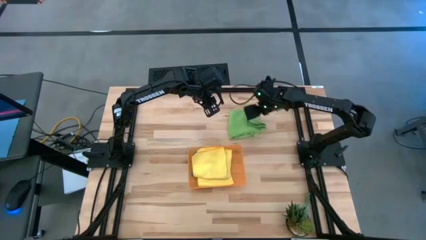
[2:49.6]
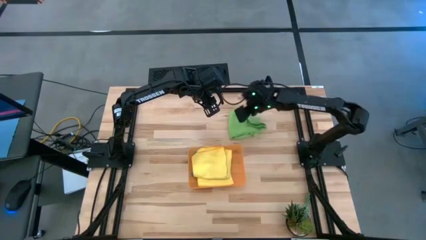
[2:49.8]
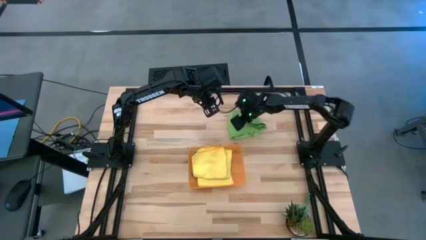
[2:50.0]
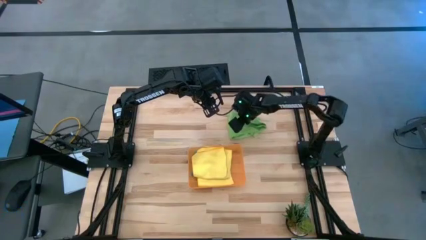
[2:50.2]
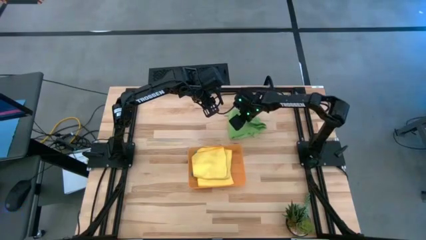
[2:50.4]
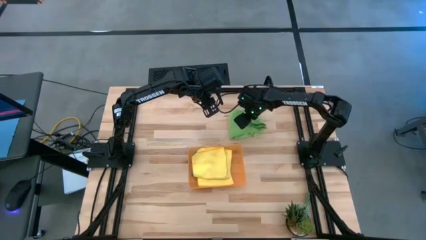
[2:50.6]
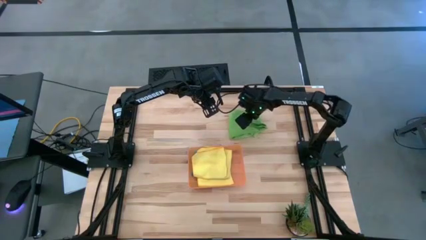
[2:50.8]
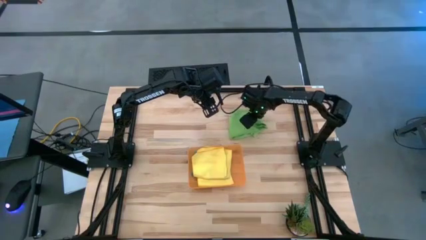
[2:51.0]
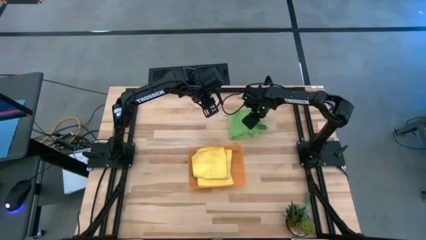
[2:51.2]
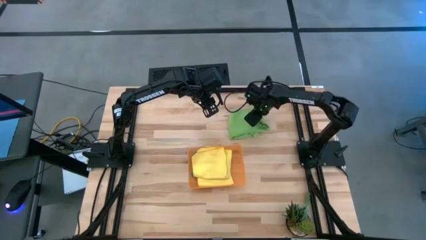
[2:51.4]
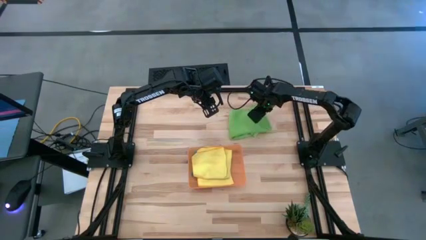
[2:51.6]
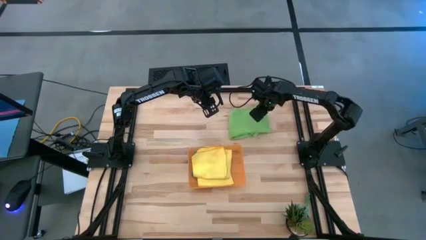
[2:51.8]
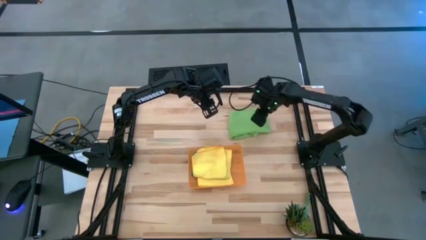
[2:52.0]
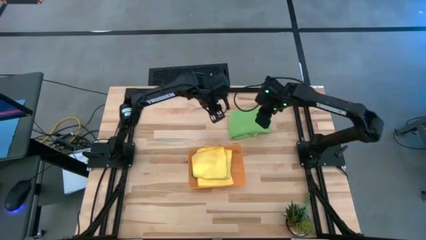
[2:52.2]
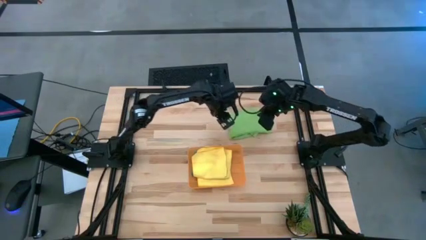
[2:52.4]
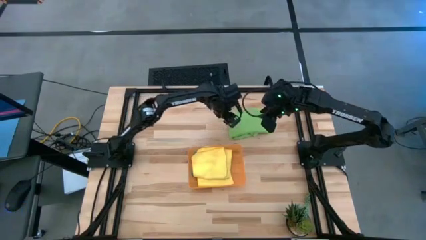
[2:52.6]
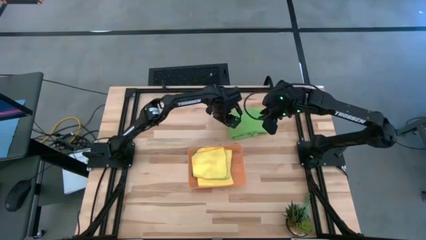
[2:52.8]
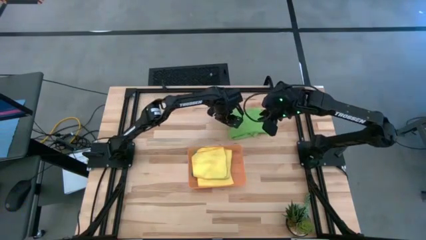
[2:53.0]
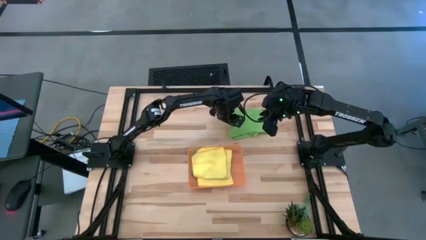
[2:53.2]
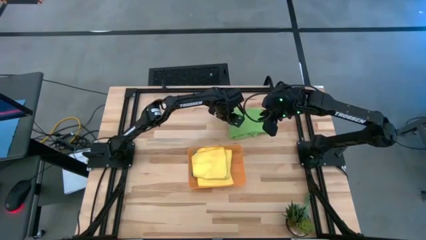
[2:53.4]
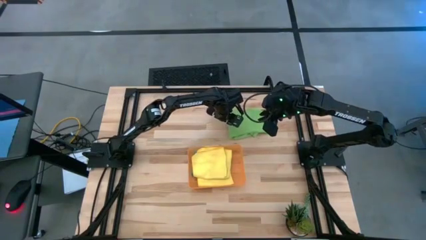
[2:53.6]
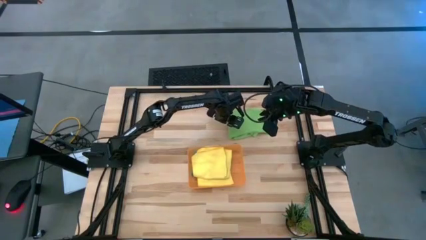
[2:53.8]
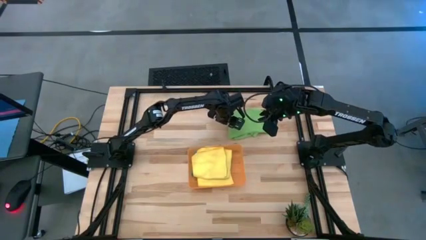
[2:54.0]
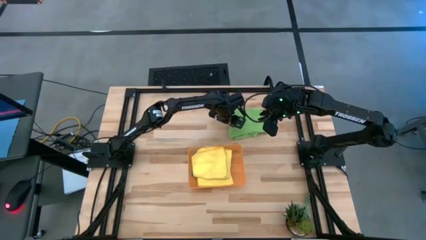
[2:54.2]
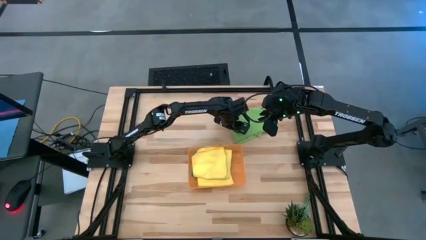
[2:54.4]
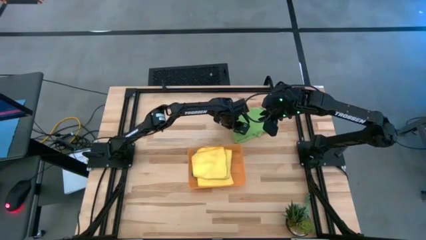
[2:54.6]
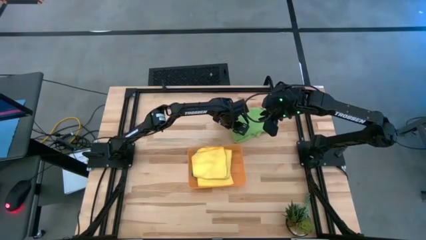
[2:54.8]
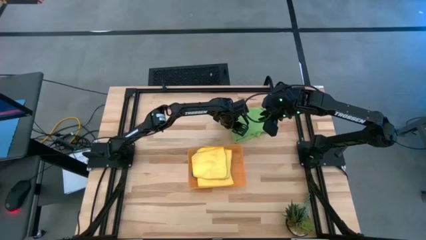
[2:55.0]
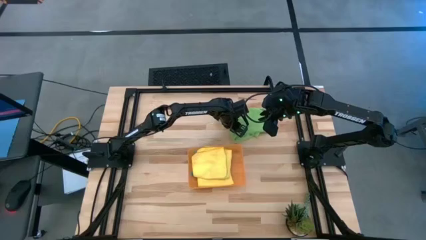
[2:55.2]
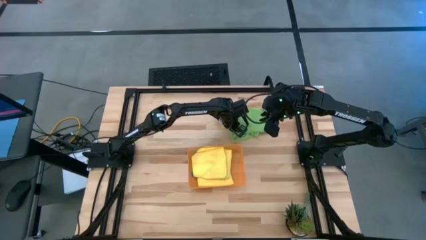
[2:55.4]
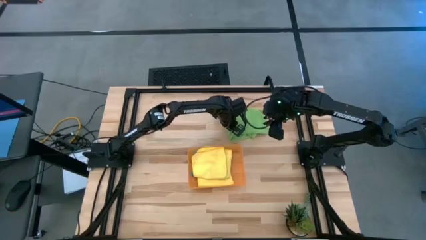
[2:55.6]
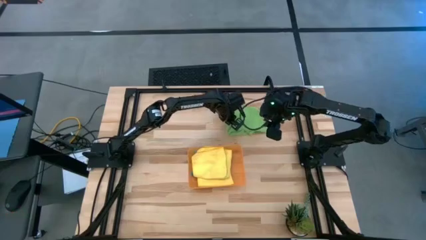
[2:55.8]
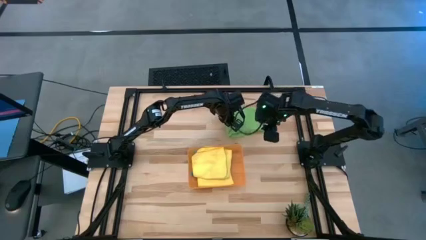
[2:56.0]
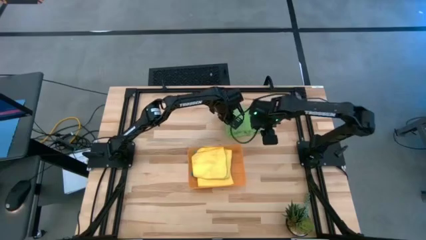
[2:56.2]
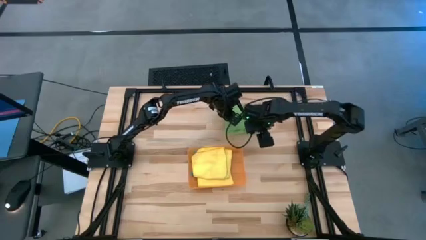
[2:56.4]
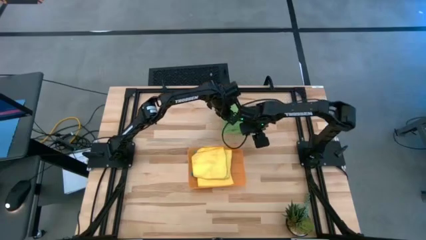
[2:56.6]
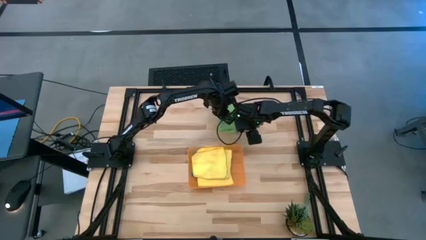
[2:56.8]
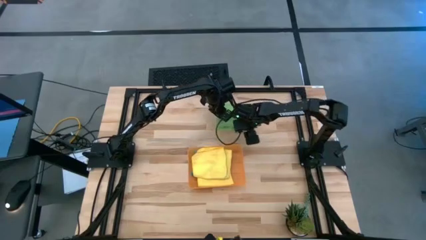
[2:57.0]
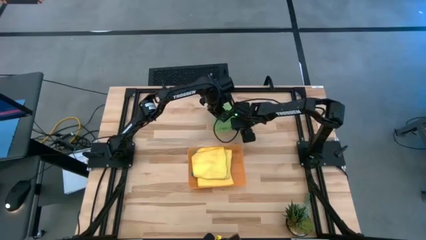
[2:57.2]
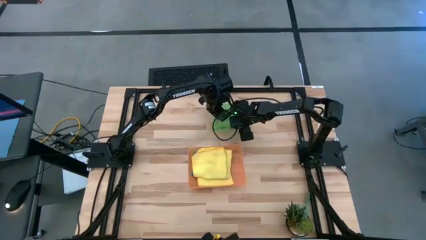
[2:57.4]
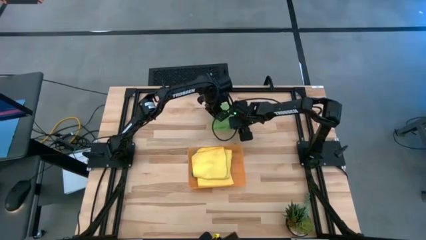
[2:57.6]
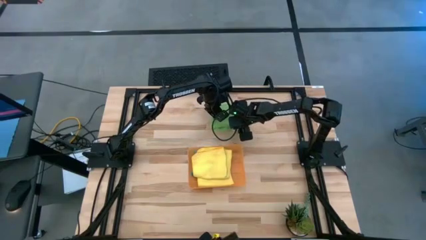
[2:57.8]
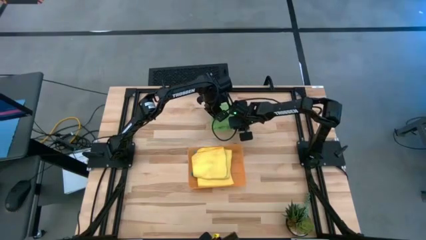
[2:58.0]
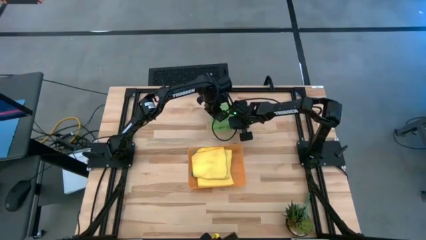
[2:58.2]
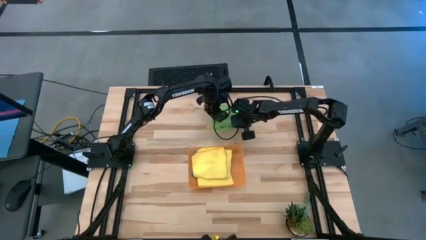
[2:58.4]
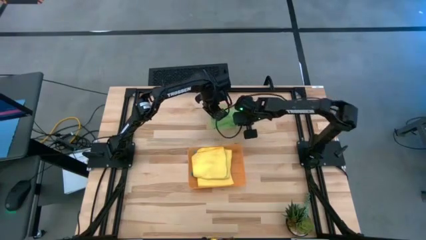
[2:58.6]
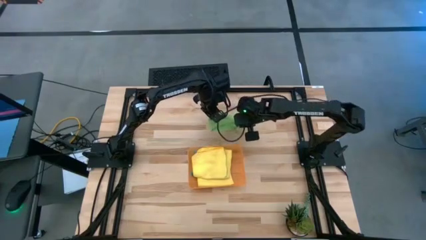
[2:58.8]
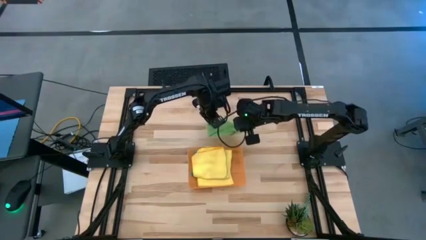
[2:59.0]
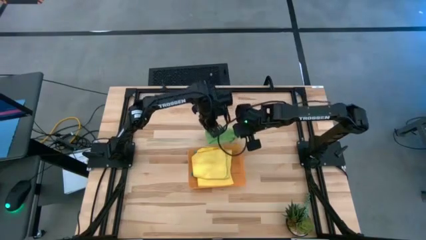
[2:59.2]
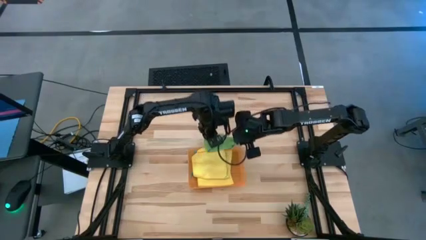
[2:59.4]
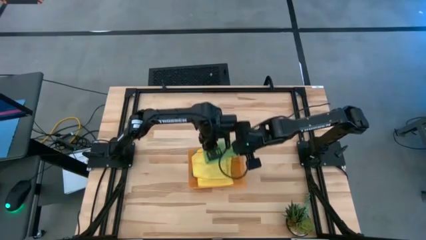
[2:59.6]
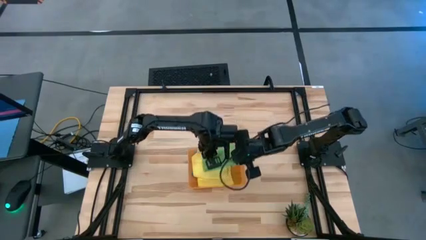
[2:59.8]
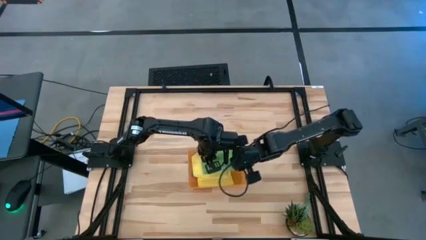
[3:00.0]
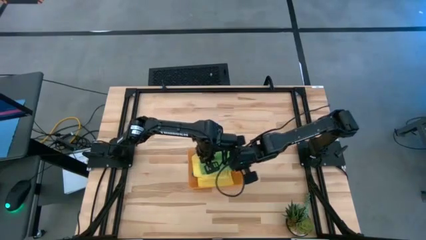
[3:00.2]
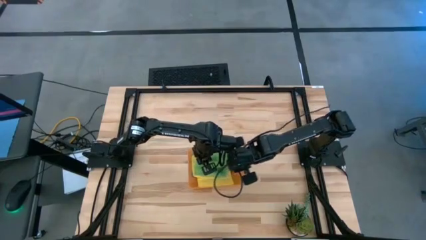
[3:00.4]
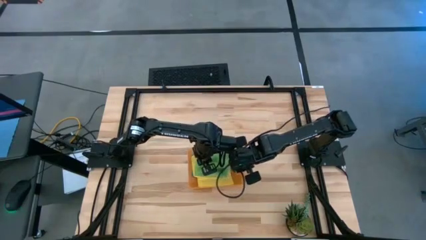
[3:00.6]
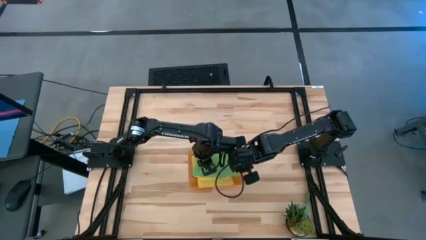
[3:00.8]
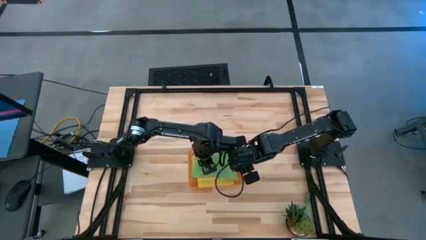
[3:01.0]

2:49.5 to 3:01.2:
Task: Fold microfiber towels
Put the green towel into the bin

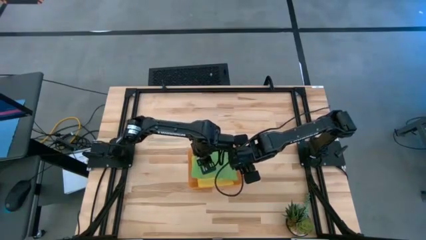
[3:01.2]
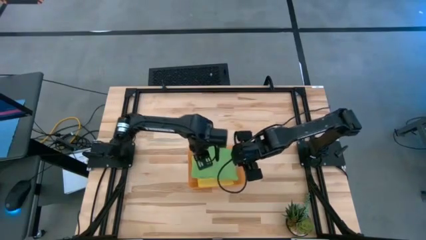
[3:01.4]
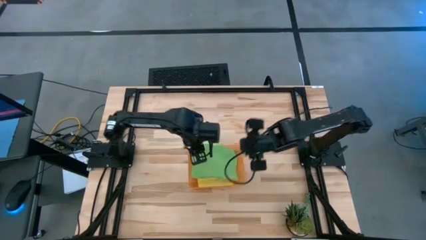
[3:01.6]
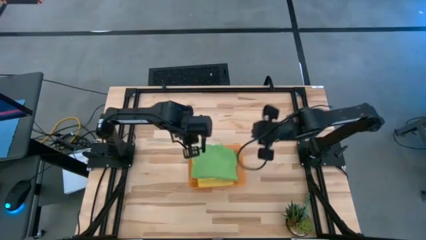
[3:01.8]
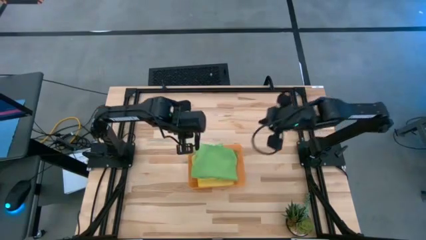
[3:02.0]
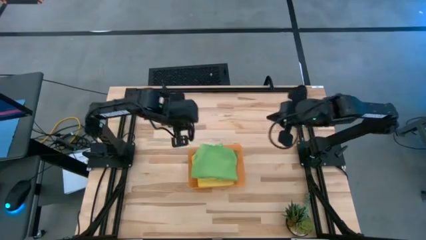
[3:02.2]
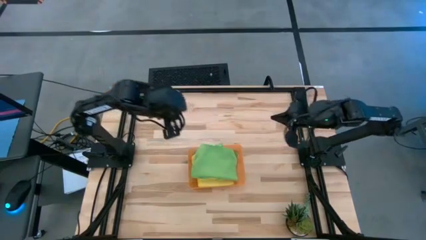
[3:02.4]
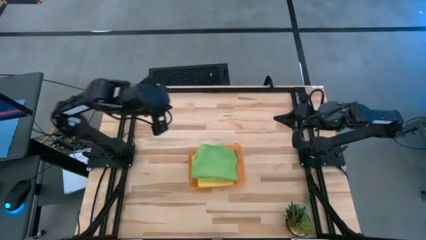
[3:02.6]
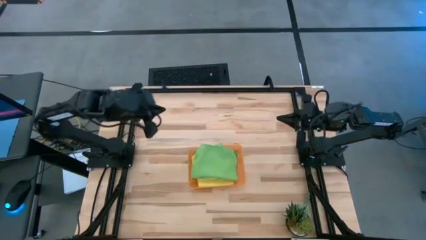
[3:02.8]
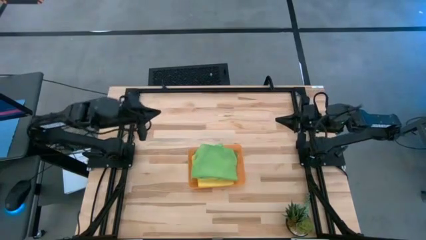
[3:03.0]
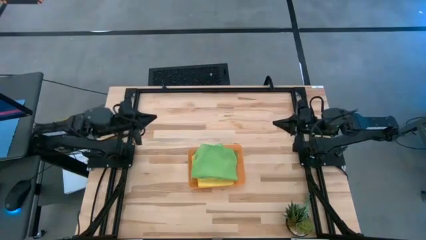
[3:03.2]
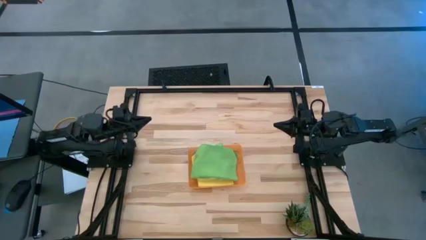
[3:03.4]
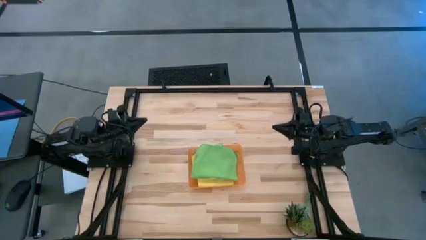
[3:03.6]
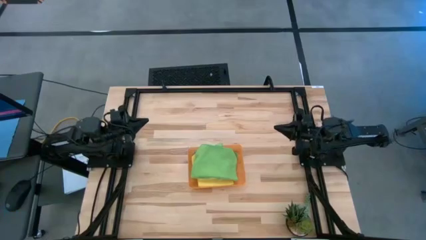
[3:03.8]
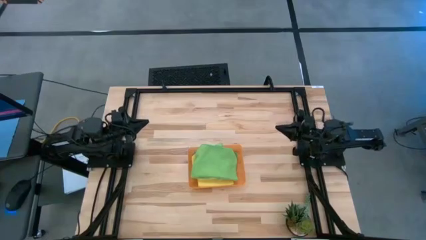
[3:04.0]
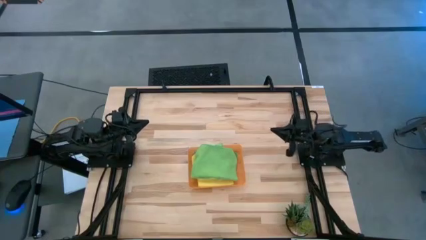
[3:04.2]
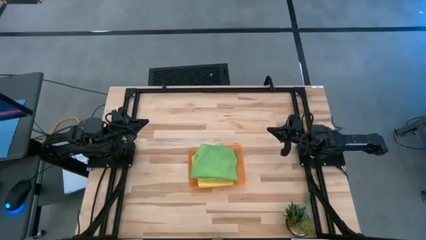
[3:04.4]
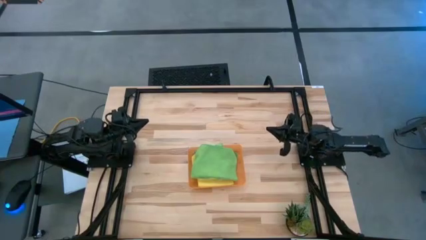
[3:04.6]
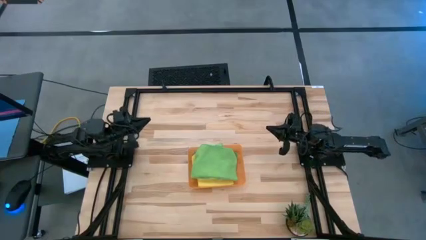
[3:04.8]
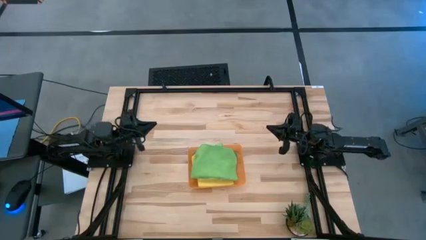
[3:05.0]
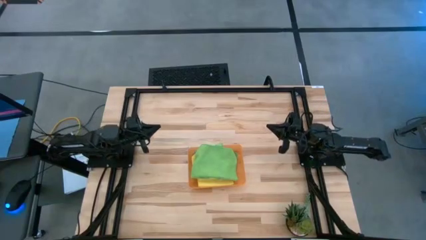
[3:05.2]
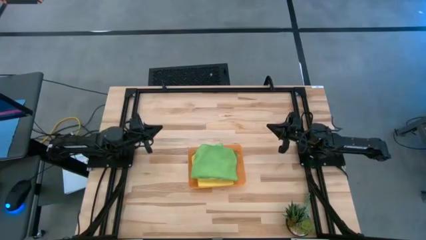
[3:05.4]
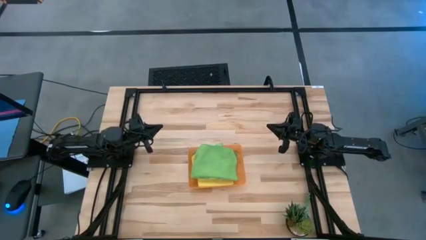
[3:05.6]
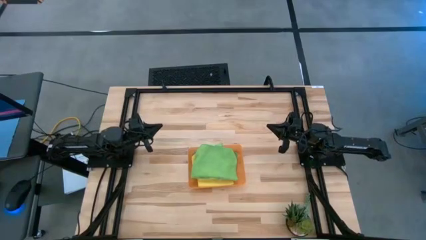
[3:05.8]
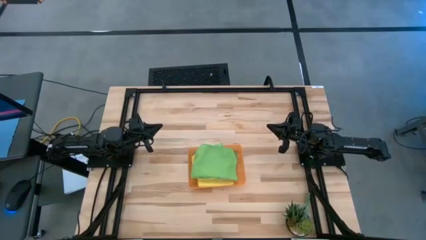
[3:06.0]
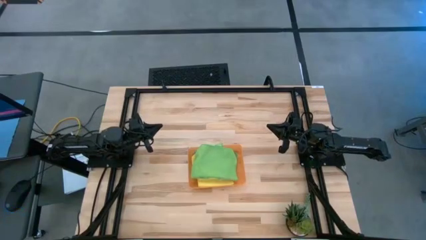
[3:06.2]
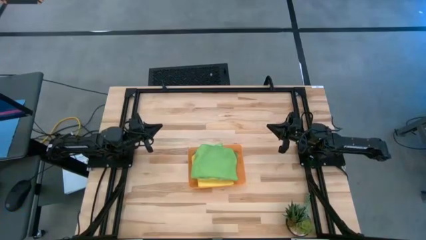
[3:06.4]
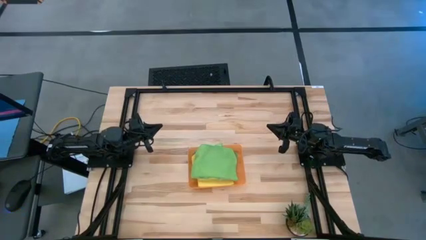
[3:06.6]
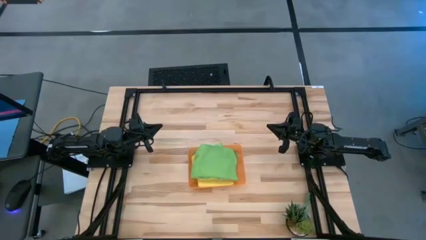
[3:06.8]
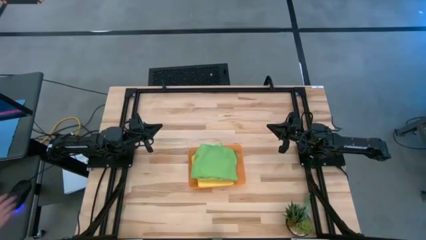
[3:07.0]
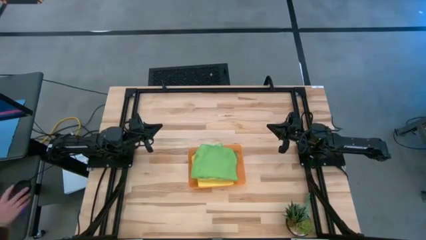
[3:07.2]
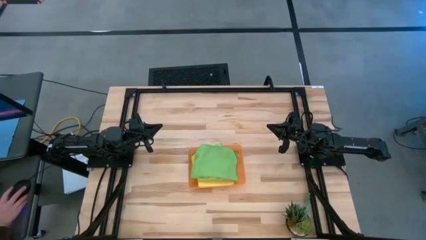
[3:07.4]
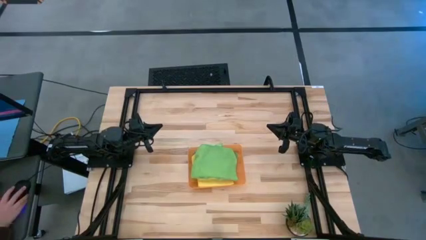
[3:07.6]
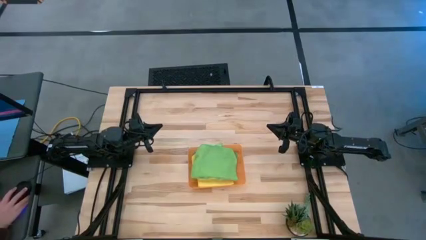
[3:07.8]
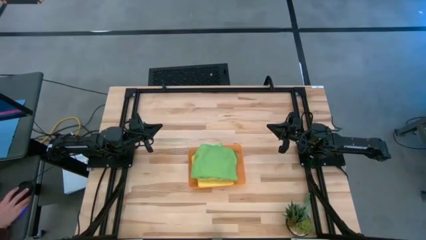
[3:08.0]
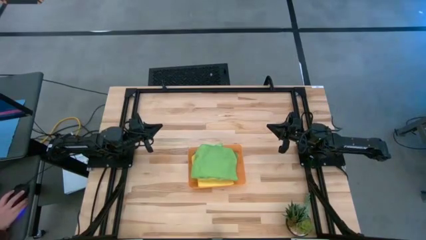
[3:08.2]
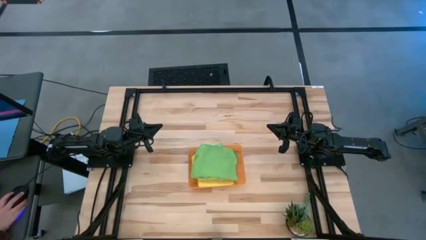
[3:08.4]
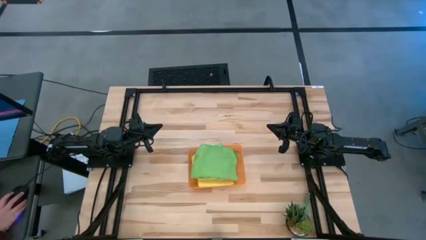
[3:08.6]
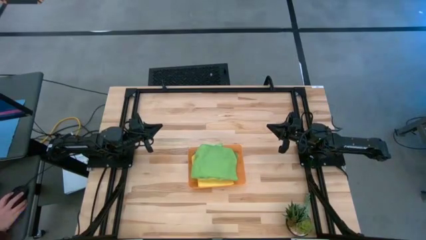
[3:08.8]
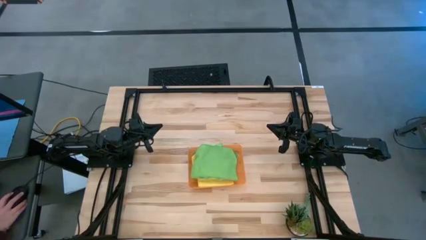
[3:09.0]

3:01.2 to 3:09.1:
Return to Home Position
